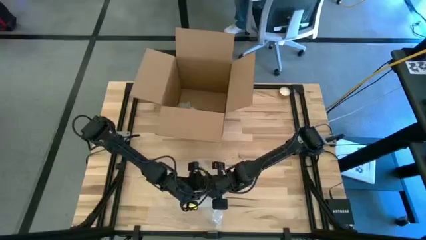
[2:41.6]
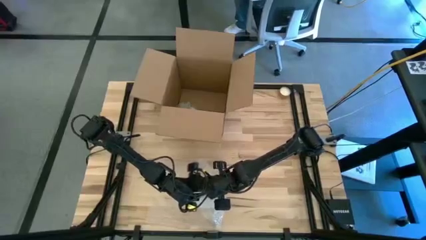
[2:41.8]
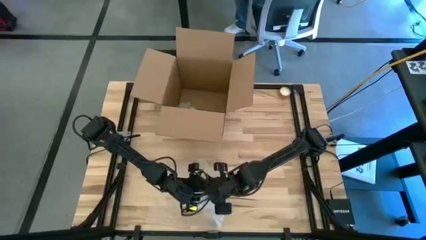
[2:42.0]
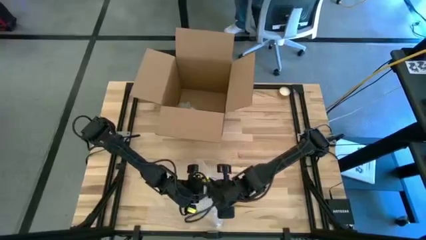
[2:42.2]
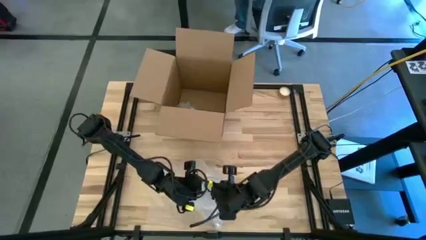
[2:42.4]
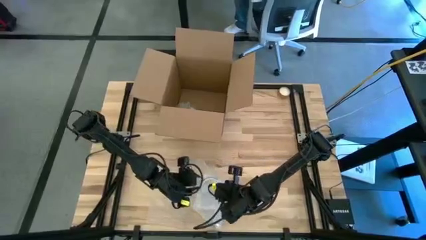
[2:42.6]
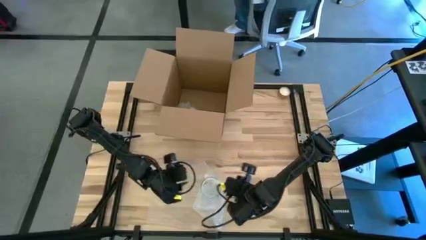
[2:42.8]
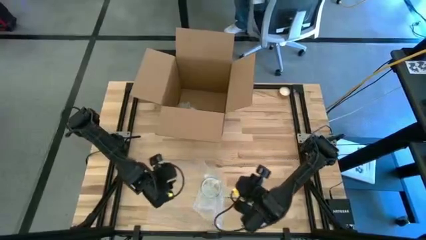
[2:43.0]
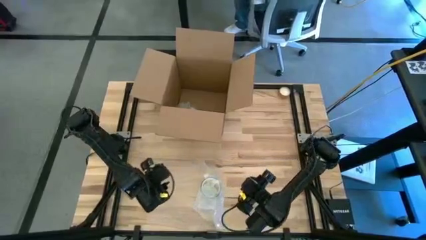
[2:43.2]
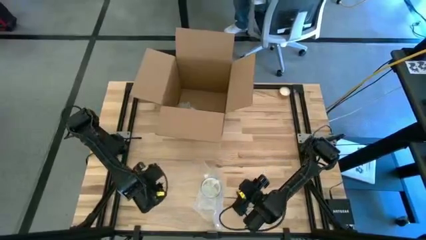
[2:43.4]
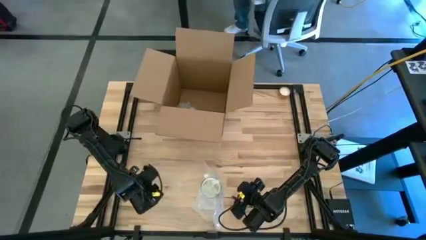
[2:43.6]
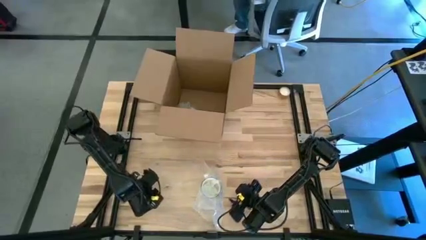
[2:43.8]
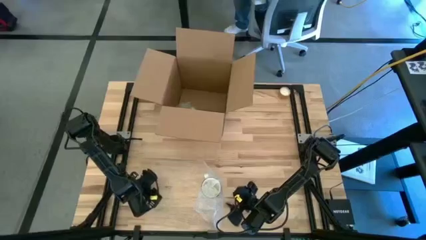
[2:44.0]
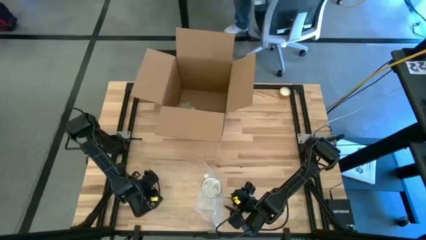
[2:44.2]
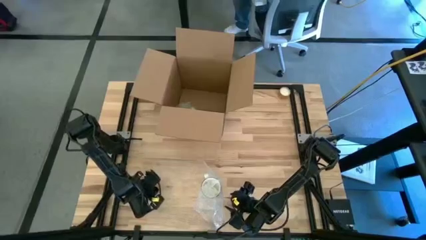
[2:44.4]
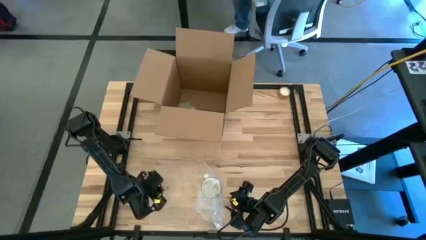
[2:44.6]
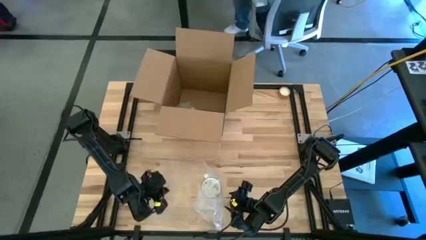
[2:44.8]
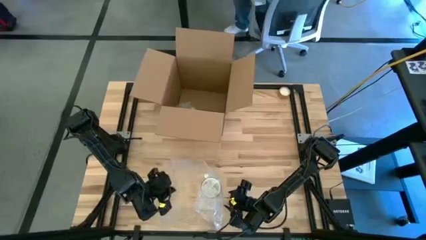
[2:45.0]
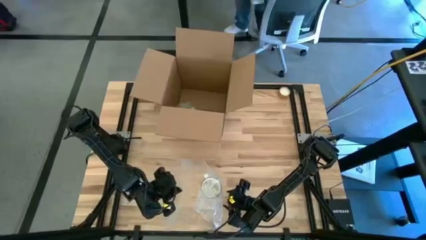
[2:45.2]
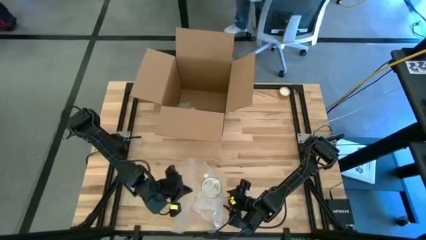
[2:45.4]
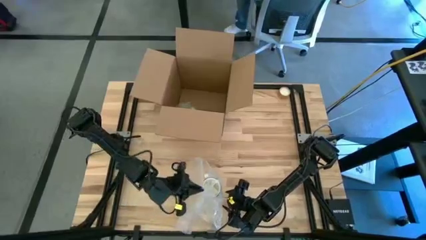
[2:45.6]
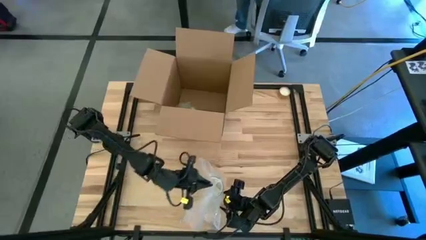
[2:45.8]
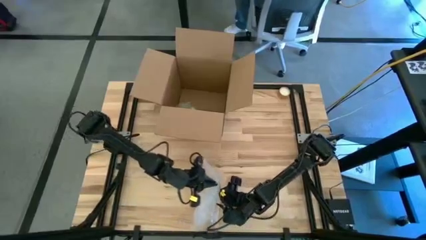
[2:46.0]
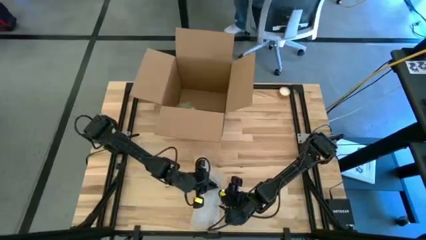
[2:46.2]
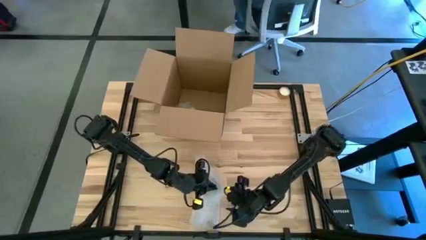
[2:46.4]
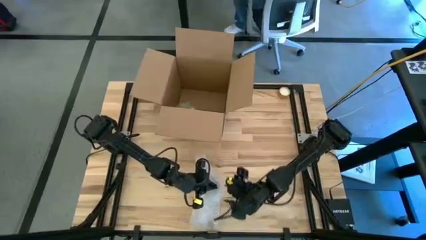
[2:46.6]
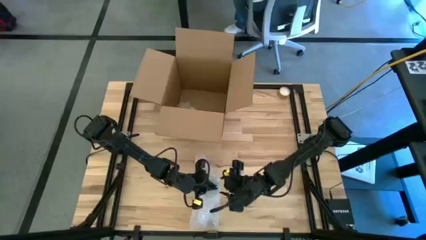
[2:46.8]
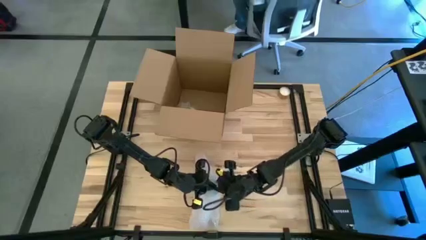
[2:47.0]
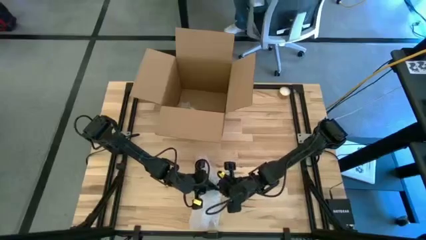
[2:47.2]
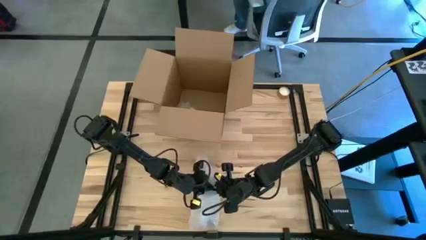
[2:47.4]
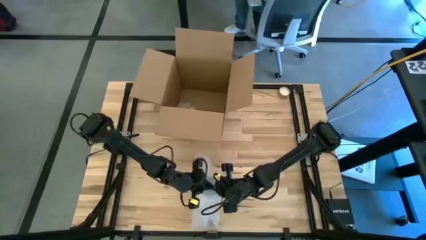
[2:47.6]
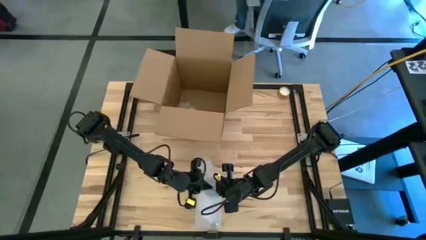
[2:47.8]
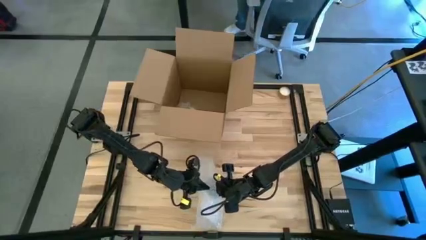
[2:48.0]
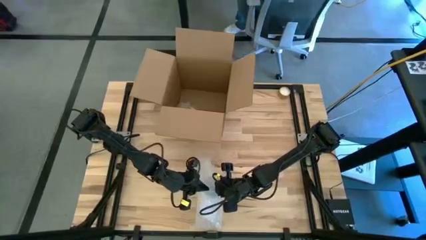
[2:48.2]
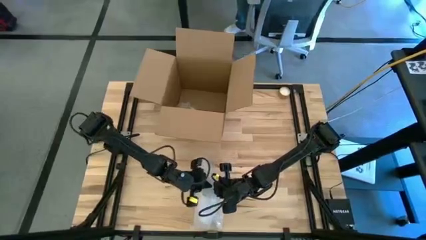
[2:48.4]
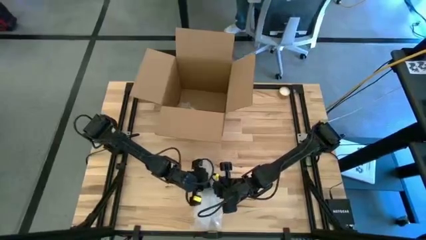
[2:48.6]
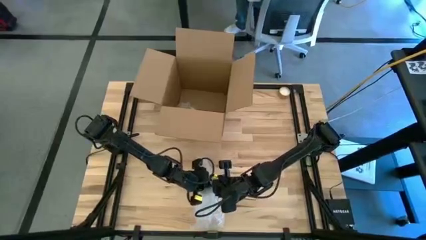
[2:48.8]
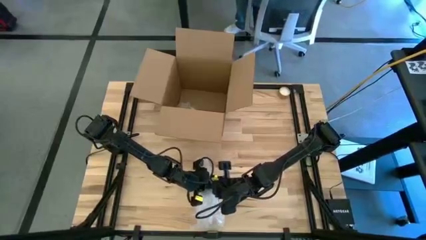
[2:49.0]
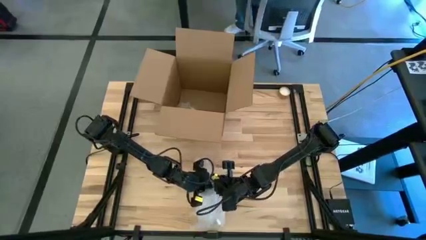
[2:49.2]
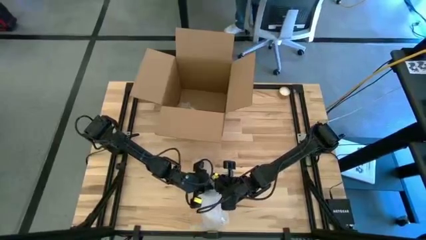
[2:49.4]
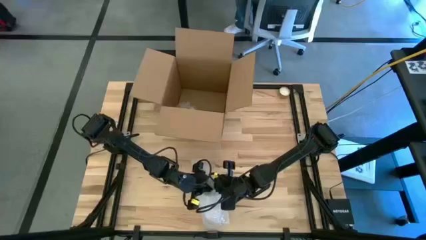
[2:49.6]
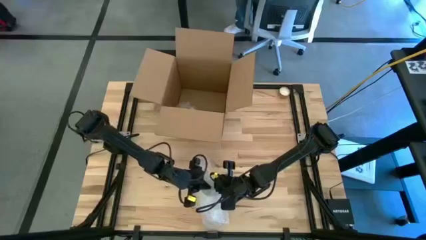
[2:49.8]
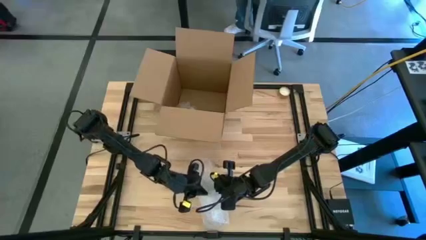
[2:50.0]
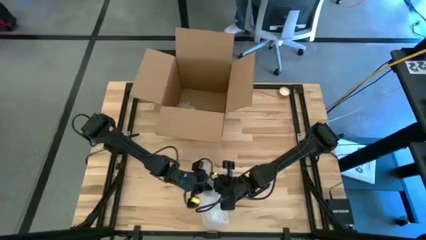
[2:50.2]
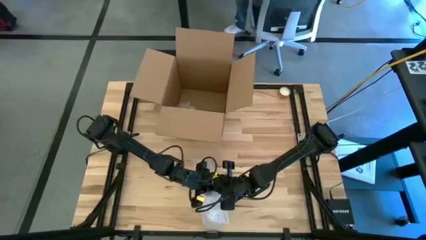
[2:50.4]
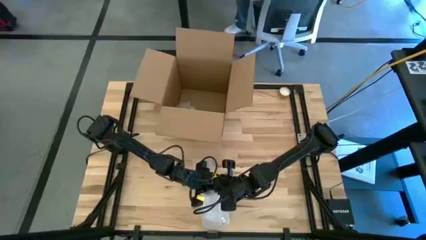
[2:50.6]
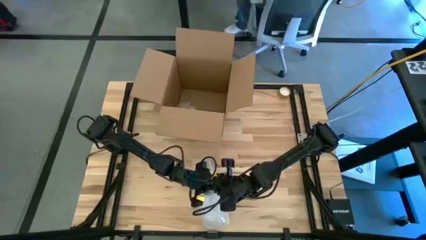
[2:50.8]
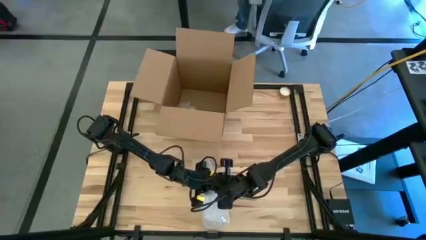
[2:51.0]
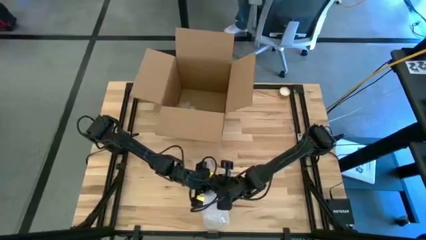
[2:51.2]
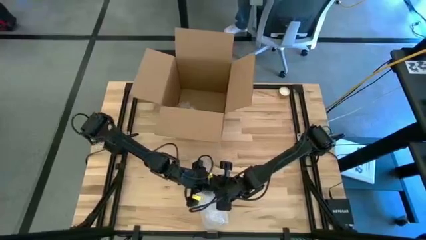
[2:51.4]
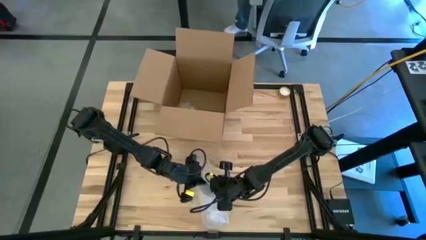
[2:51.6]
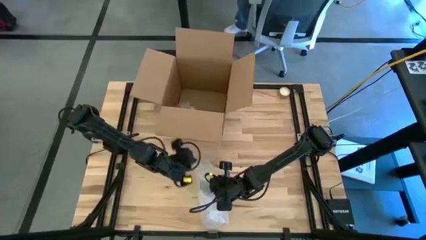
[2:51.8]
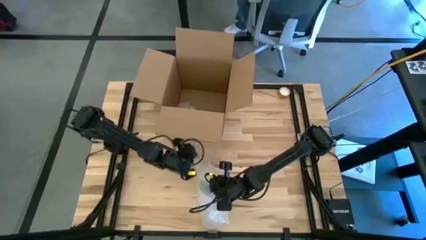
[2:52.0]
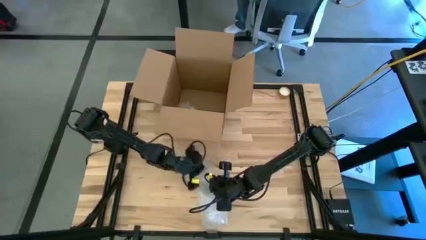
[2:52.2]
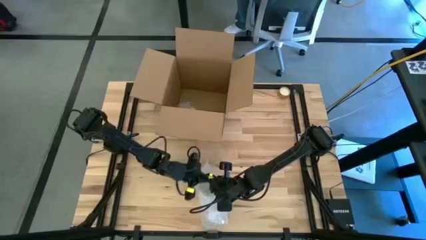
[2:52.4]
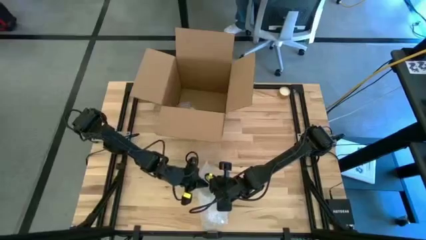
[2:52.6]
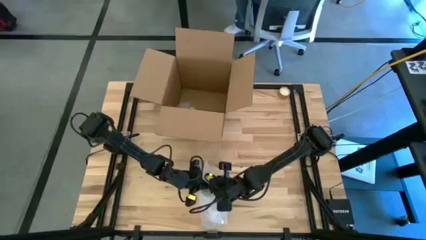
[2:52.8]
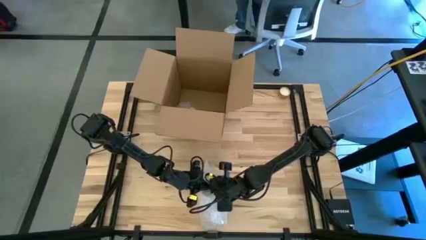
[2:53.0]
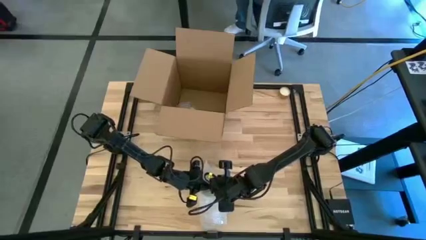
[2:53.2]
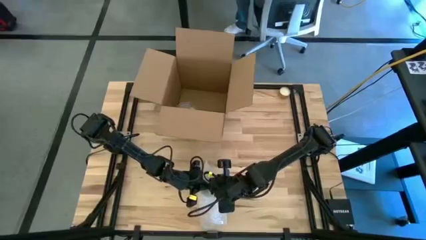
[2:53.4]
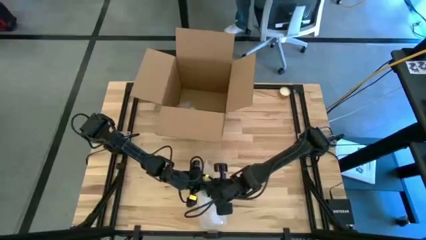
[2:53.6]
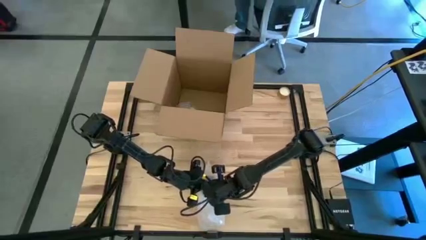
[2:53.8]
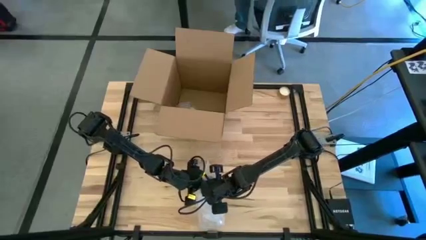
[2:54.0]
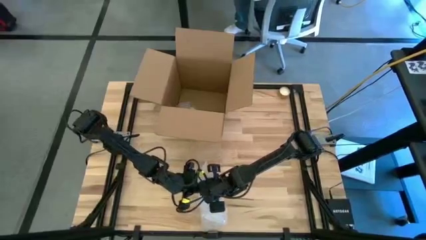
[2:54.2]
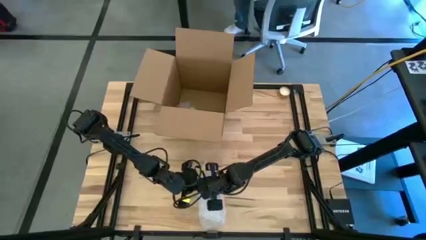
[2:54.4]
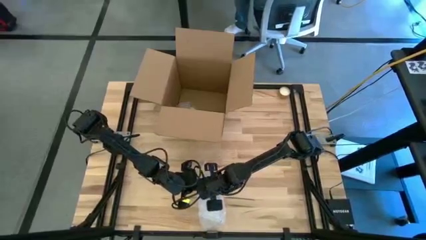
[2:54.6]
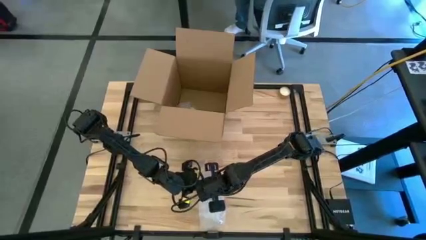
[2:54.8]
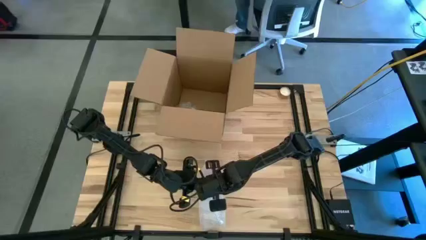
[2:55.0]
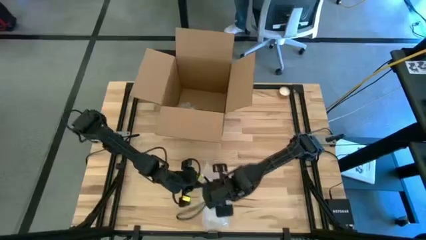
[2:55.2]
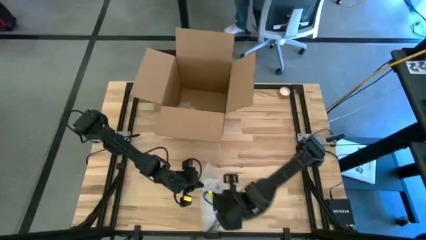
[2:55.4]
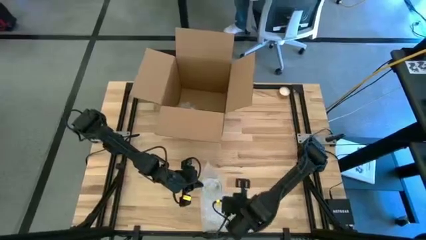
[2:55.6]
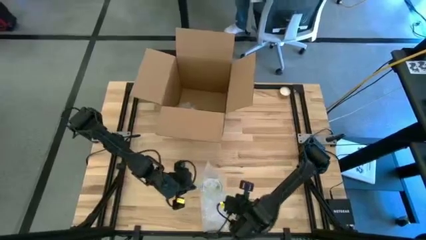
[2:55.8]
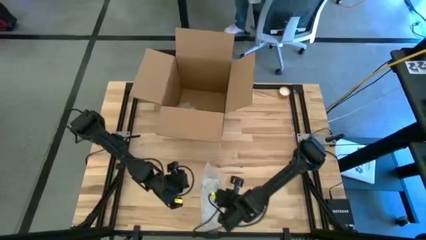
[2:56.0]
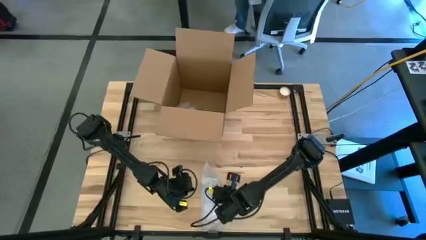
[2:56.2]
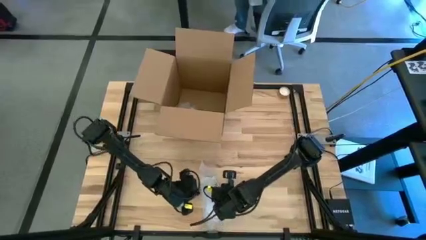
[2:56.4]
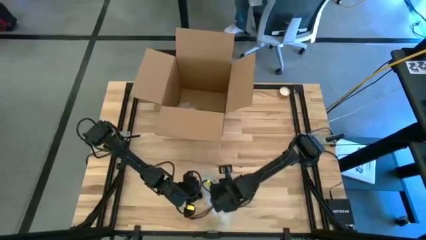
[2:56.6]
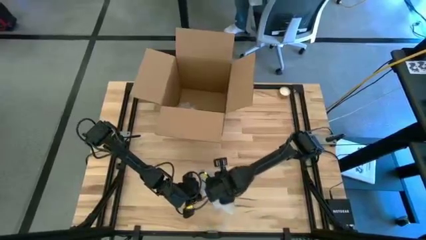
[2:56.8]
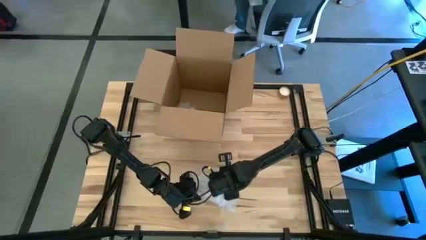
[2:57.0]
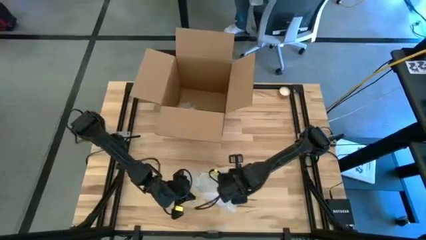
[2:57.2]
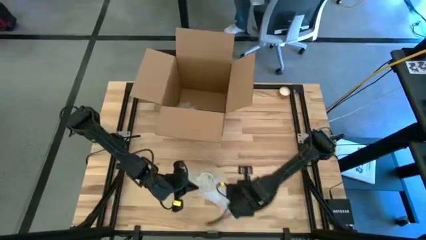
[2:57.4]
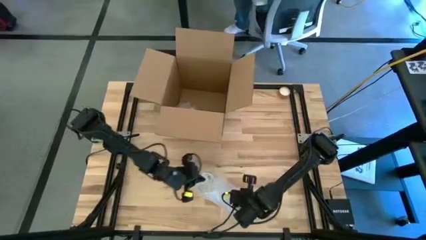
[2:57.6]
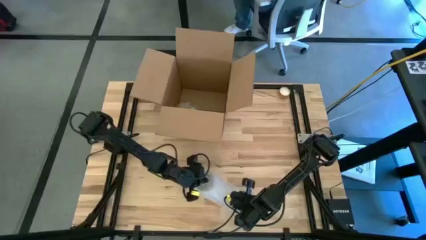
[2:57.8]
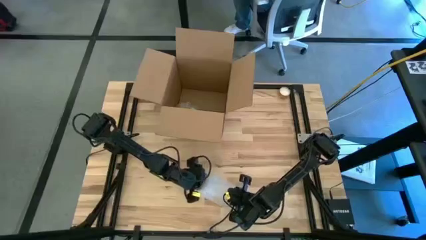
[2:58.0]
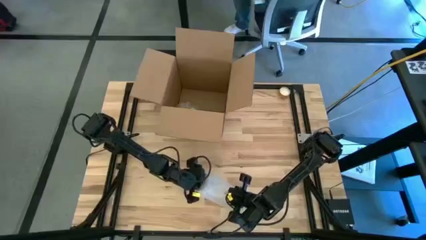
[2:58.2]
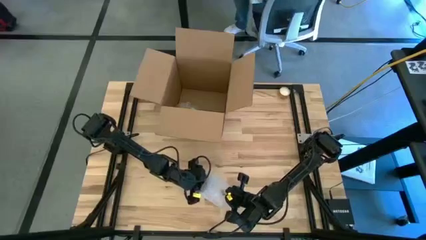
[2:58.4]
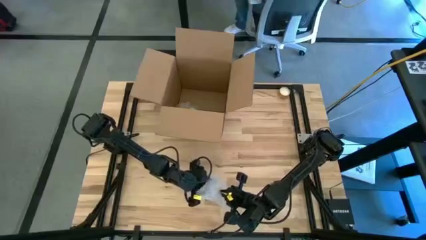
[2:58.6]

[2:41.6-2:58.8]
Task: wrap mug
Wrap the white mug with transparent bubble wrap
